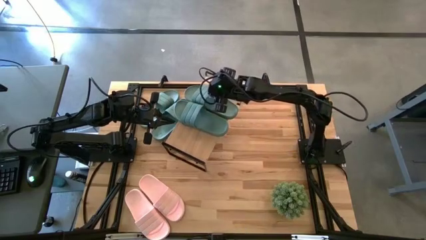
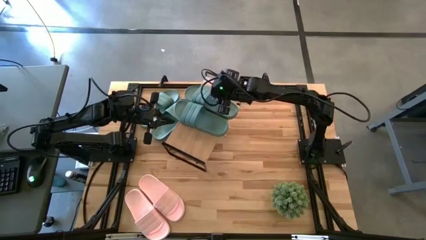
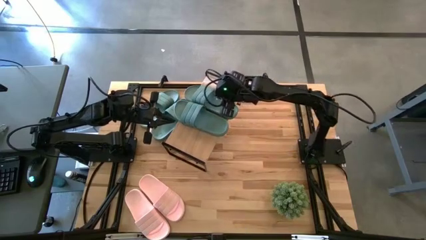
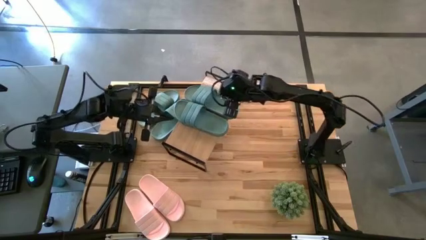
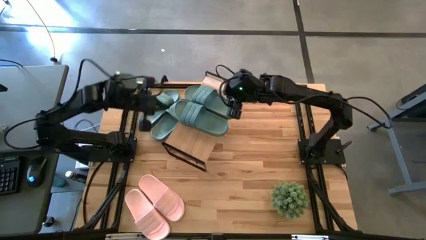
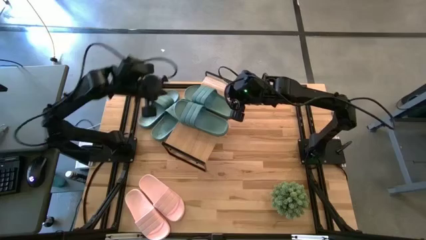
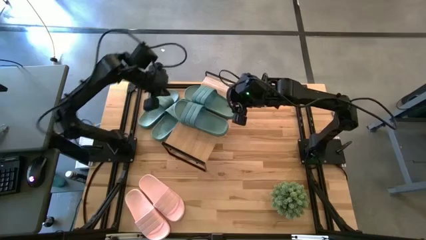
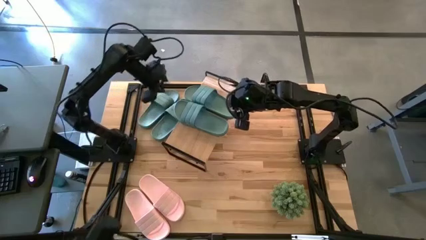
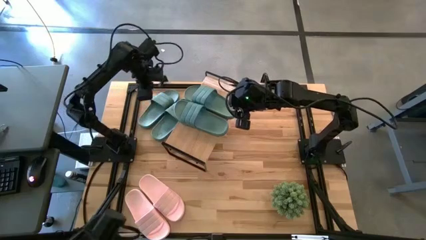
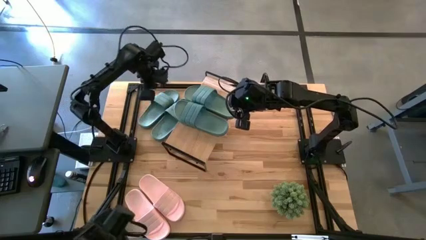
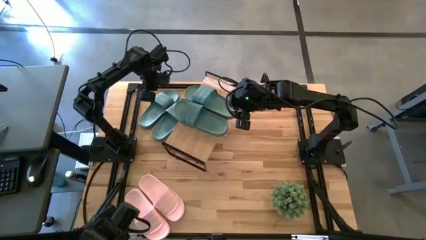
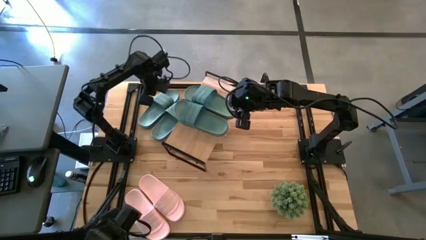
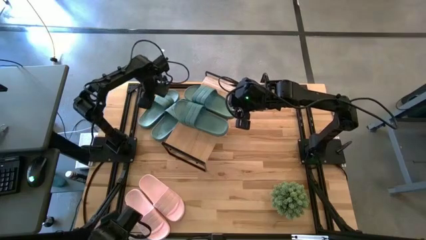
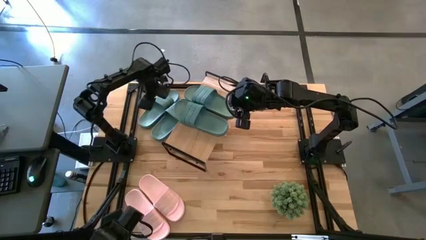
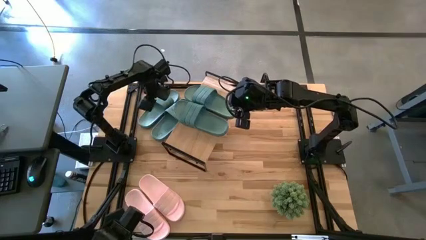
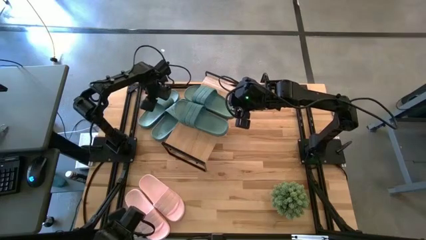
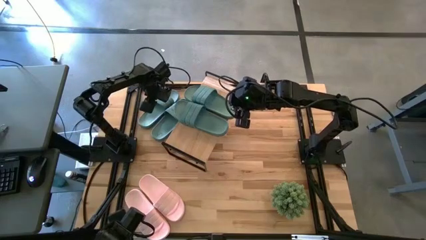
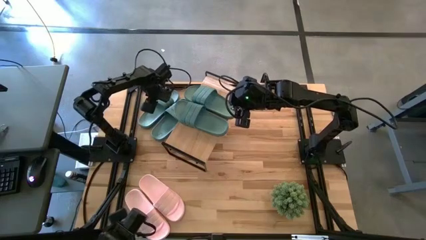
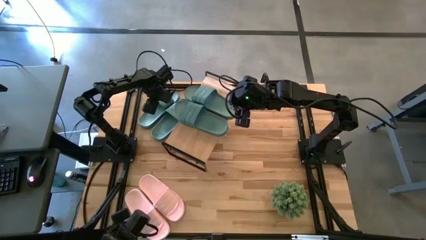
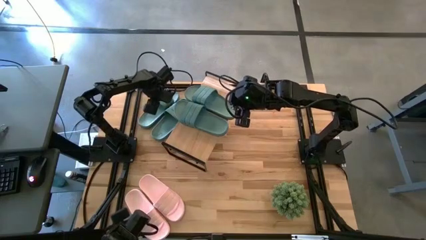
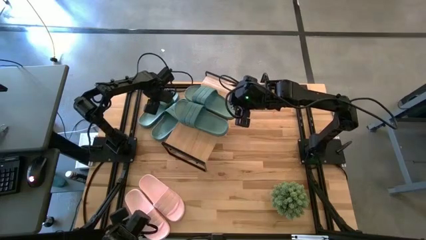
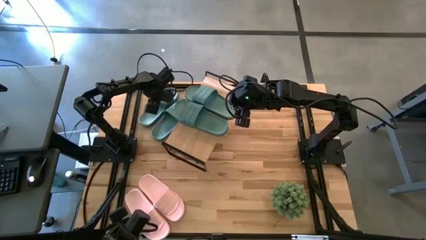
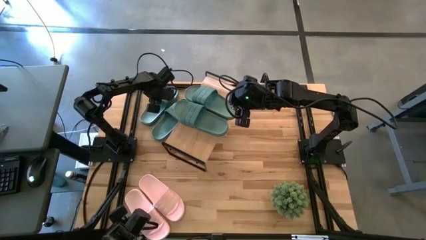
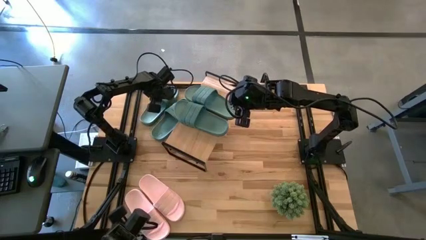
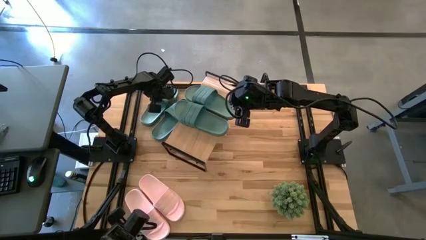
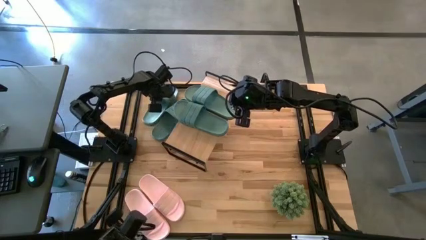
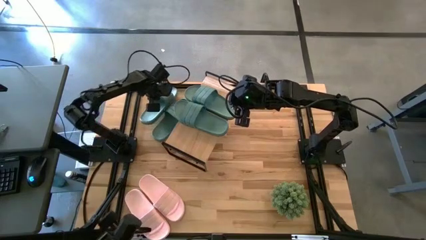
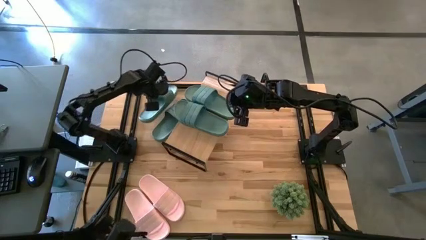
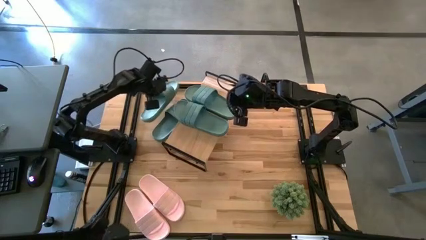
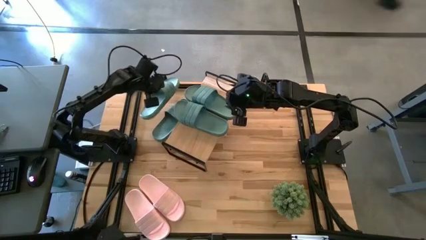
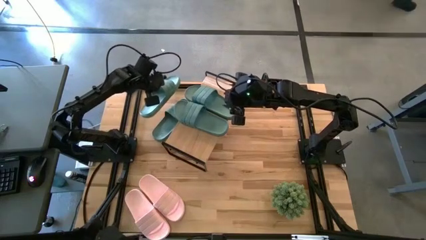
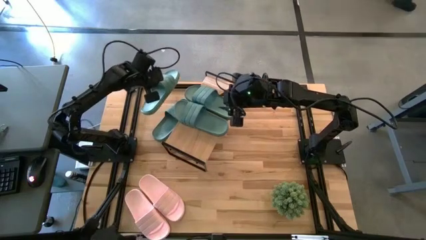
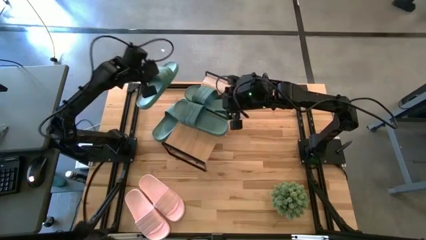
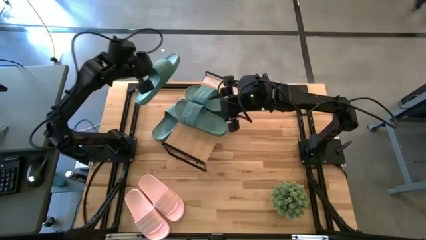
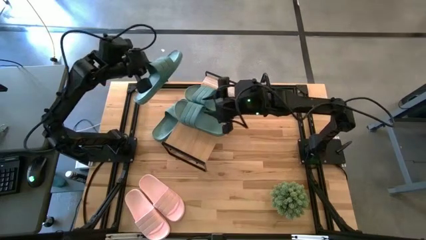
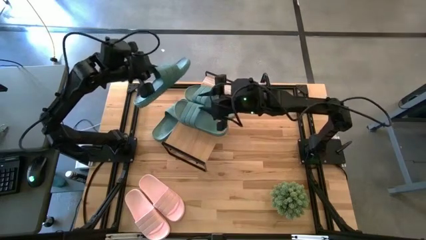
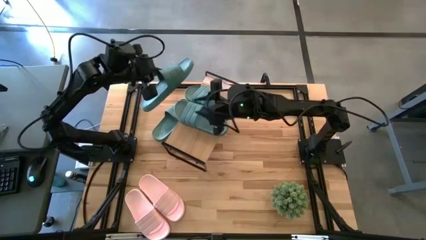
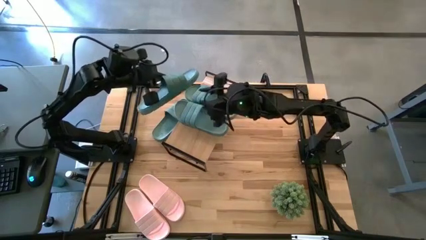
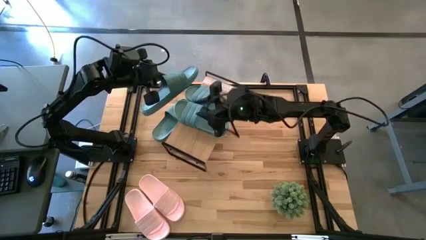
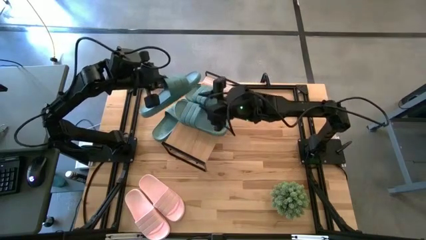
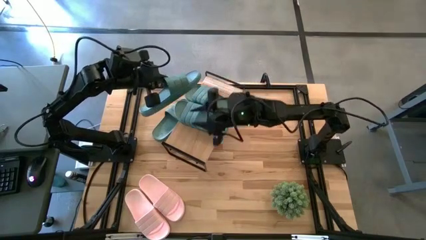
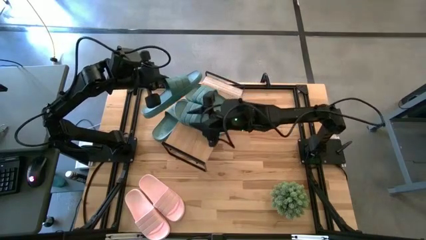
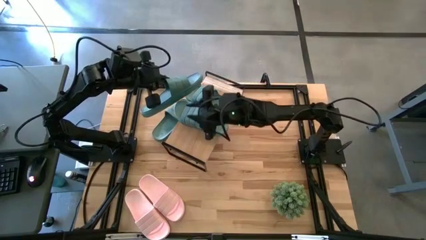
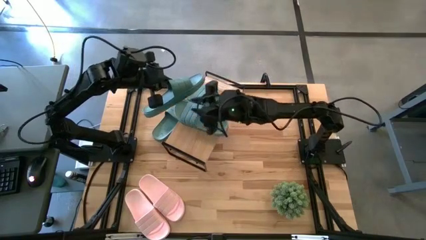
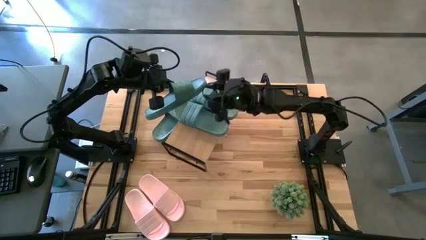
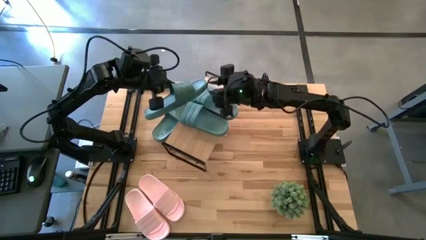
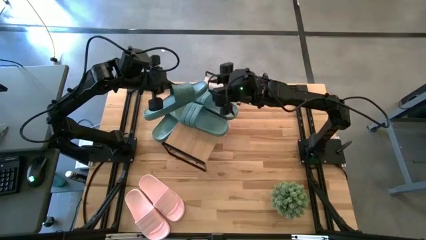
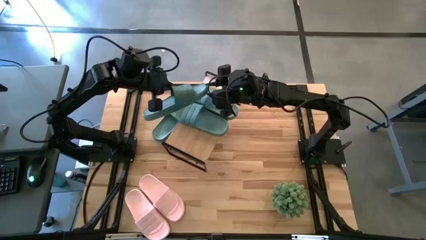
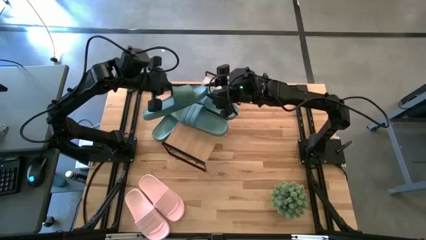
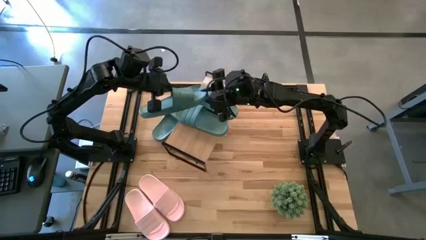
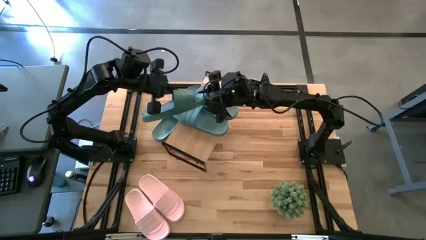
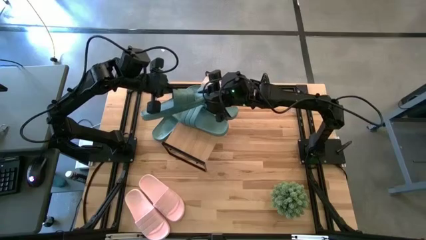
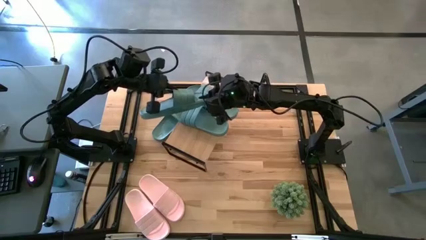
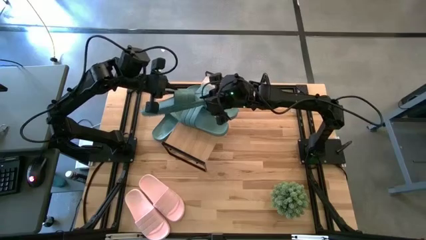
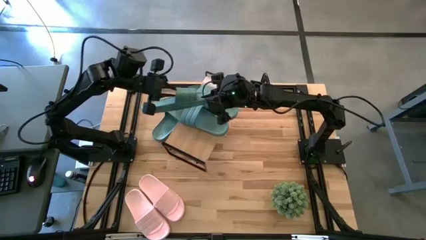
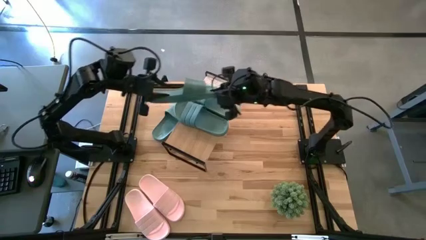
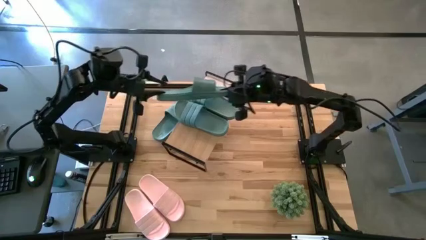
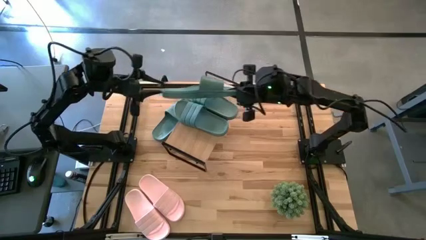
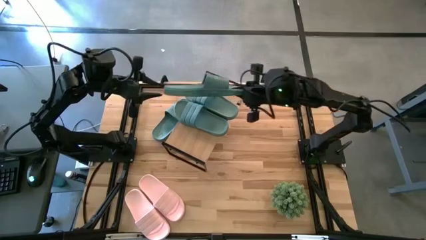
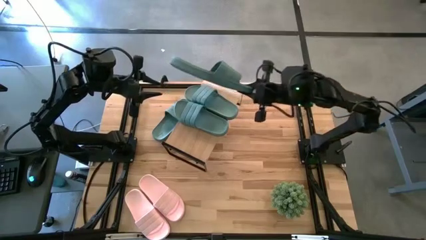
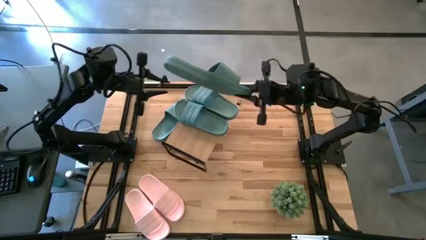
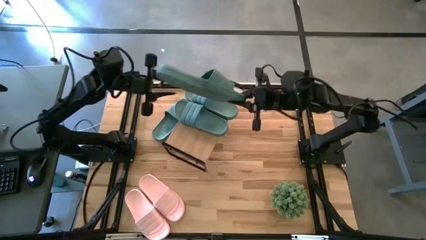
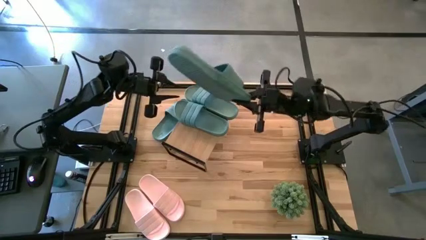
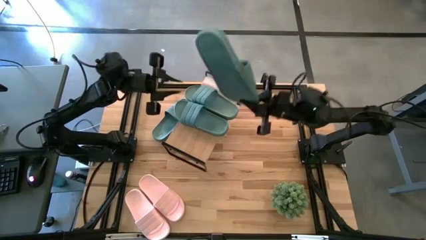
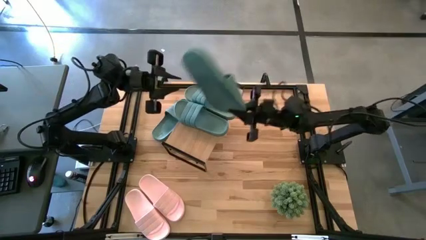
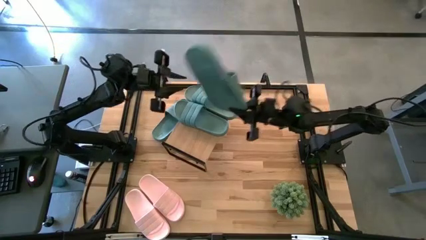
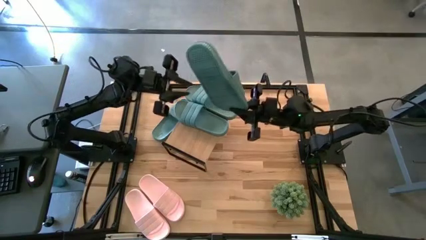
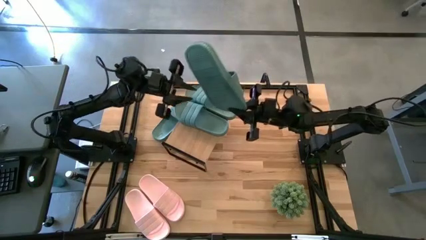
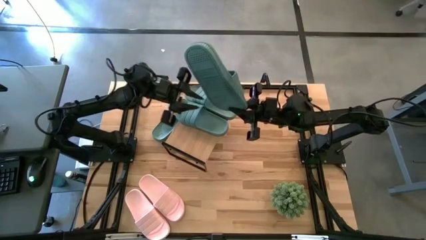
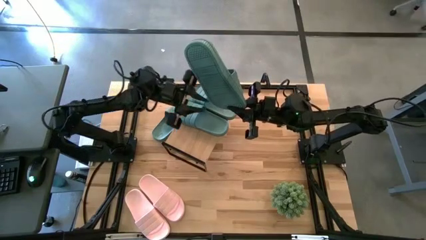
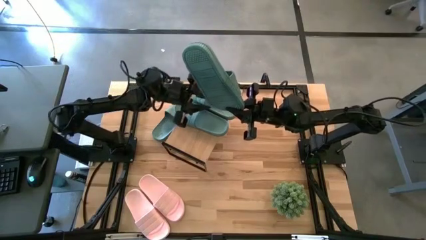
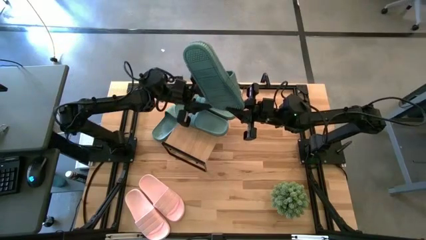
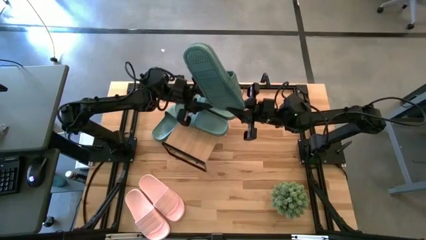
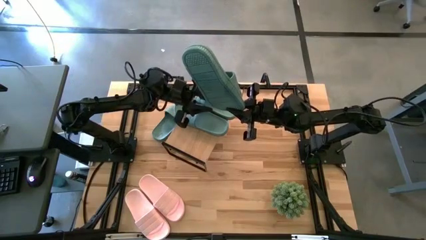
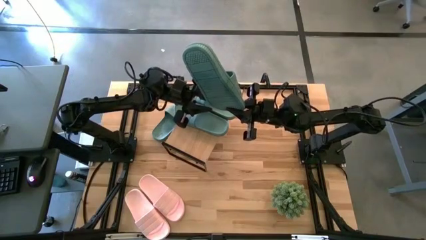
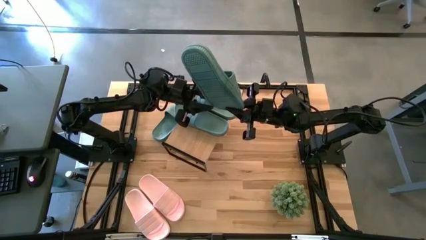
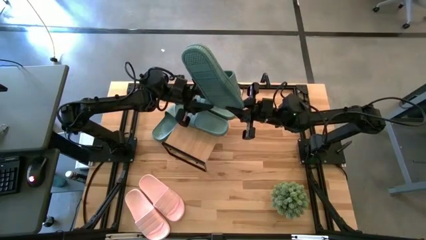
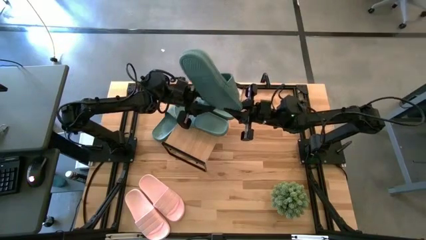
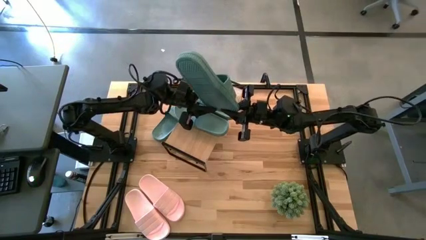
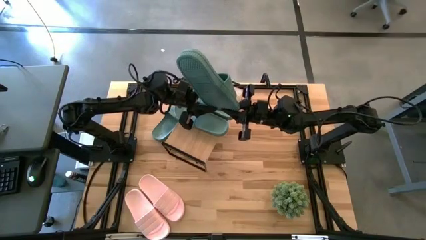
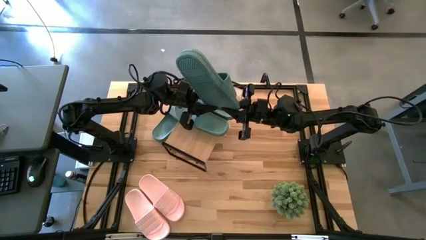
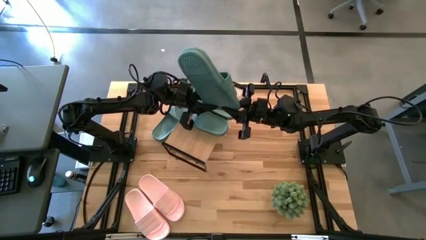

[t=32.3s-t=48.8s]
Task: Pick and place slides into the shelf
Put the green slide under the shelf
